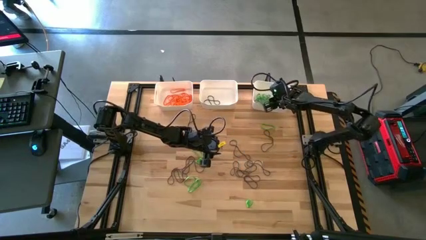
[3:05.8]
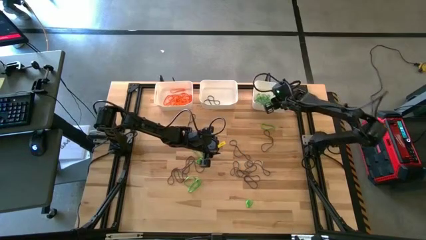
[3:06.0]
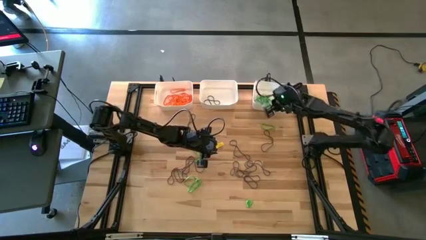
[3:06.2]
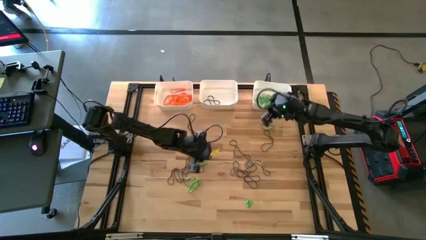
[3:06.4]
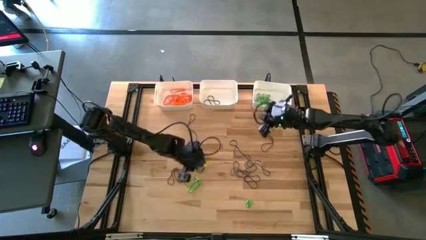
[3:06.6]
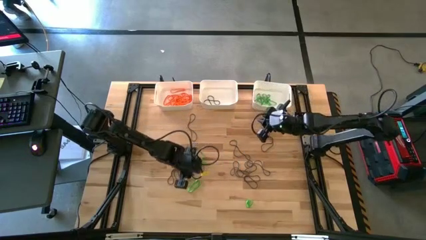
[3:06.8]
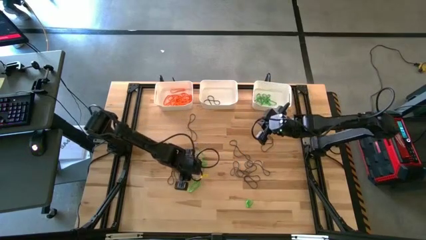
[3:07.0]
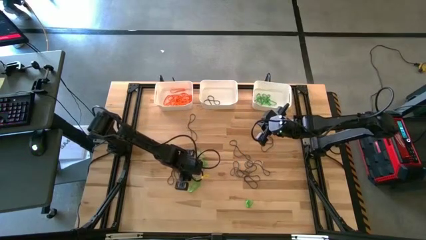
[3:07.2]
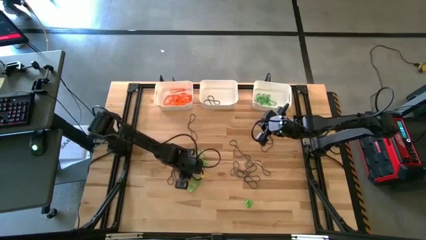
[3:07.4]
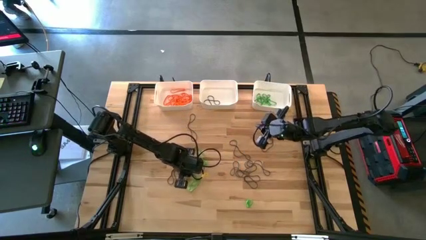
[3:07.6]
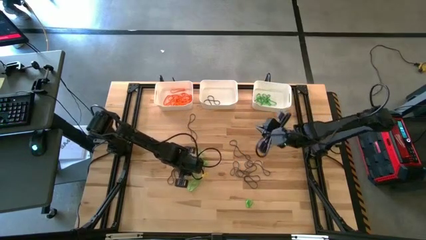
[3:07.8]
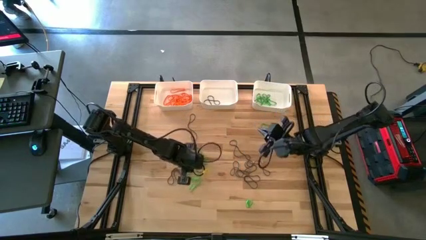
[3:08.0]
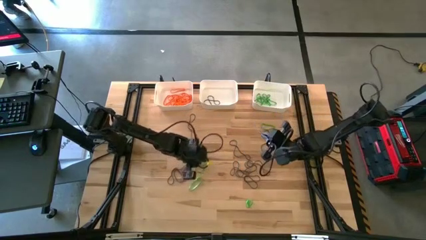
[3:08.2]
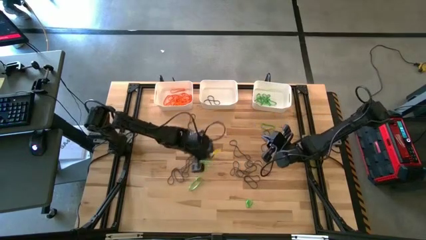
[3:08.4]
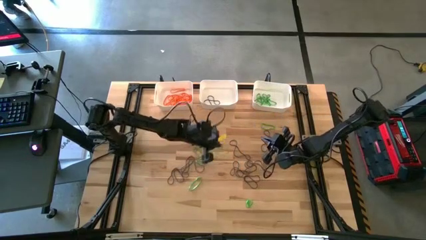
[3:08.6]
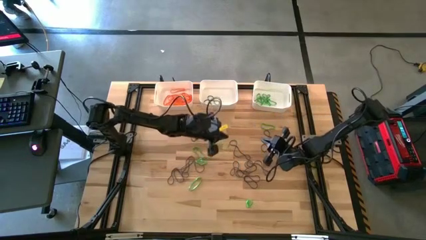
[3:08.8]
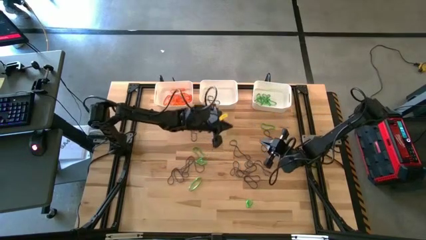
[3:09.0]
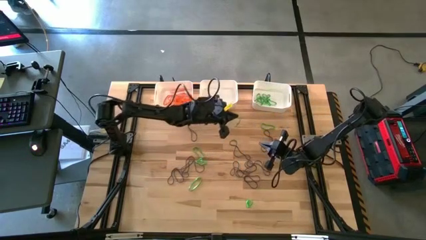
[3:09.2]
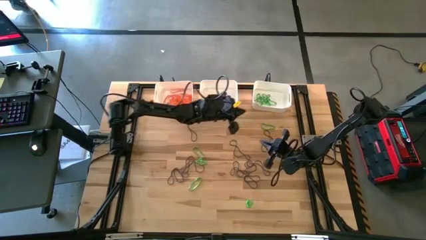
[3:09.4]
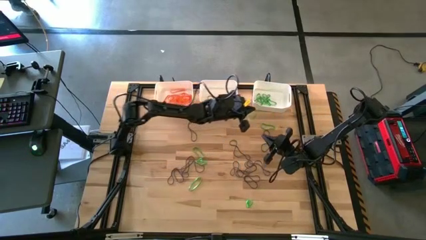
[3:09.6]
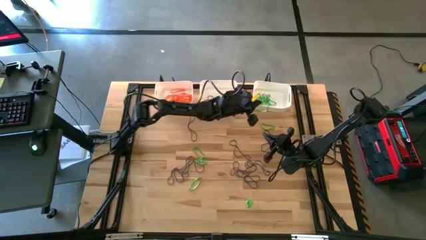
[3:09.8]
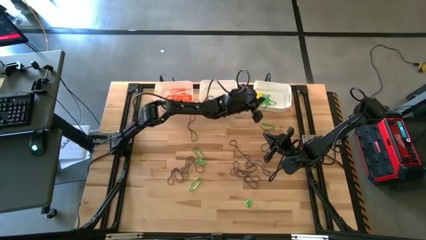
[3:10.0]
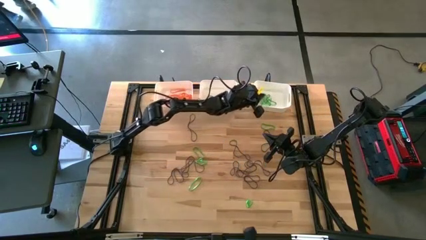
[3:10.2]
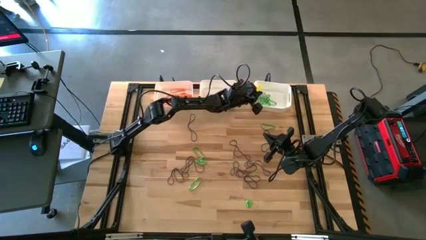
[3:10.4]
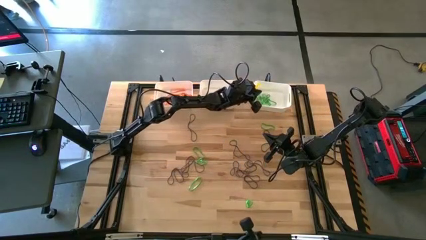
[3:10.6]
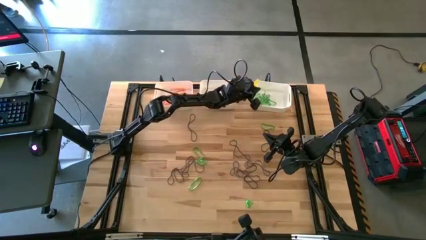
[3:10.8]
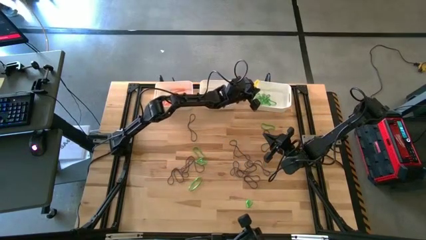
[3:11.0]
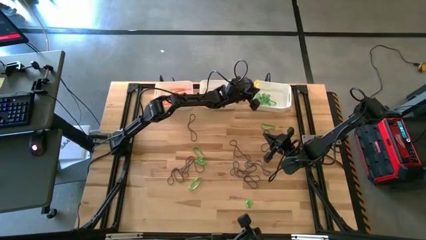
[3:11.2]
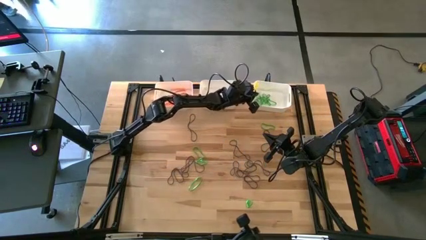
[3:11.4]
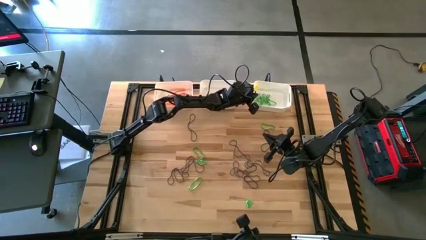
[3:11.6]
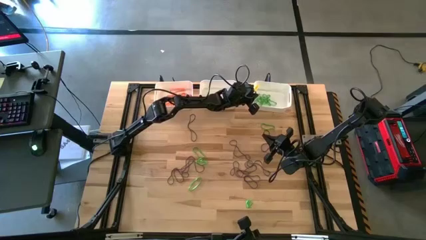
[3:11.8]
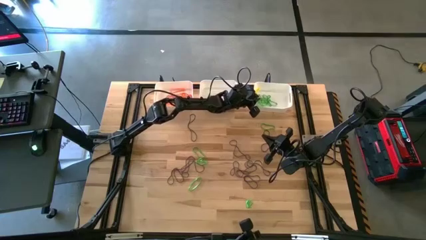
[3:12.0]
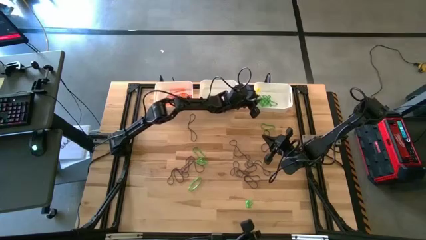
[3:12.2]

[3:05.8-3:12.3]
Task: Sort rubber bands into baskets
Put the green rubber band into the right white bin

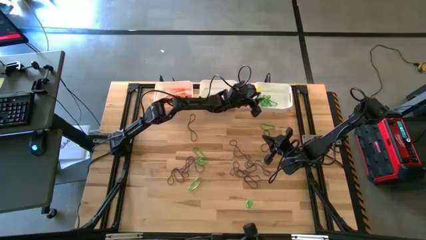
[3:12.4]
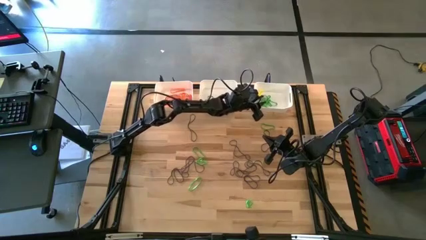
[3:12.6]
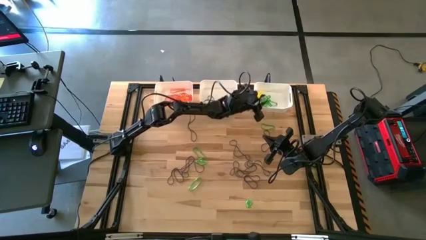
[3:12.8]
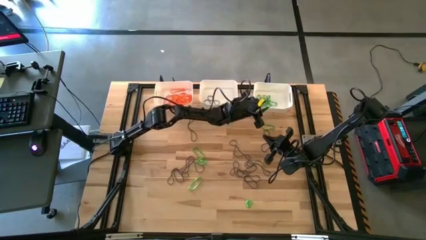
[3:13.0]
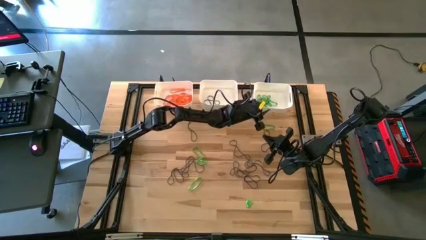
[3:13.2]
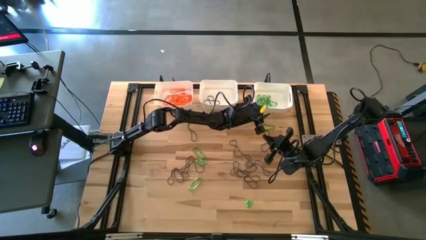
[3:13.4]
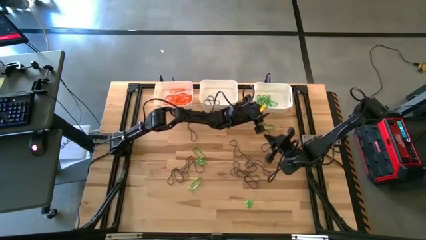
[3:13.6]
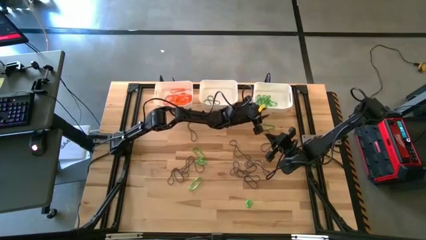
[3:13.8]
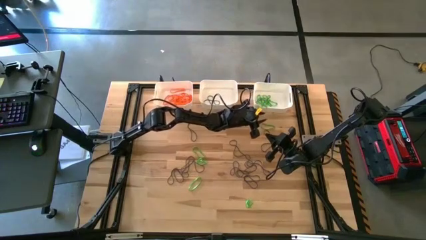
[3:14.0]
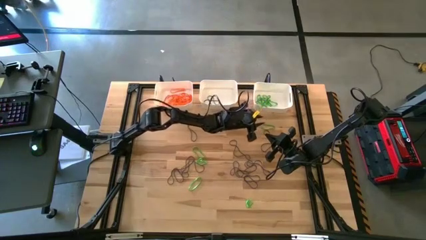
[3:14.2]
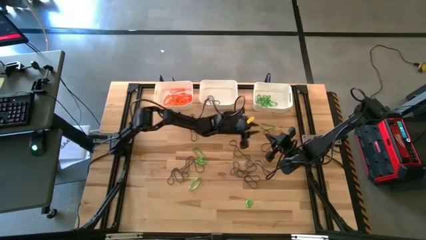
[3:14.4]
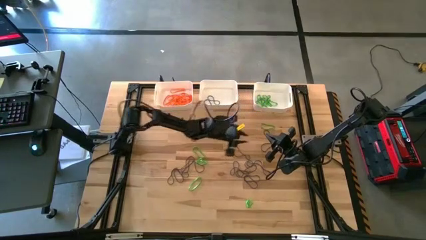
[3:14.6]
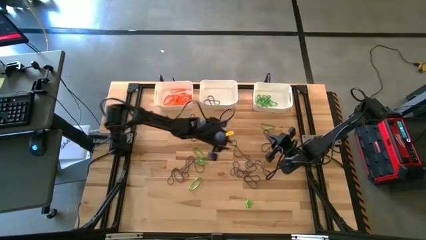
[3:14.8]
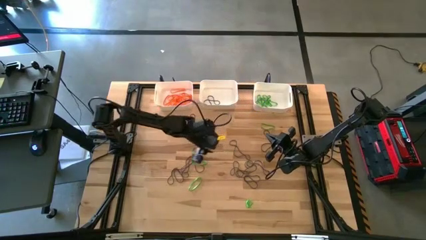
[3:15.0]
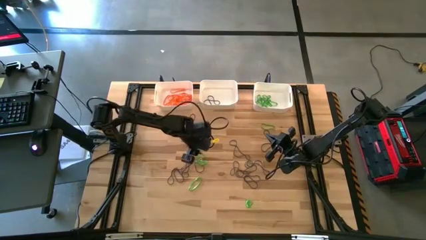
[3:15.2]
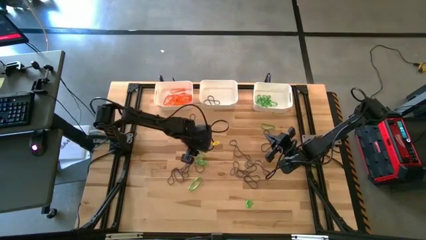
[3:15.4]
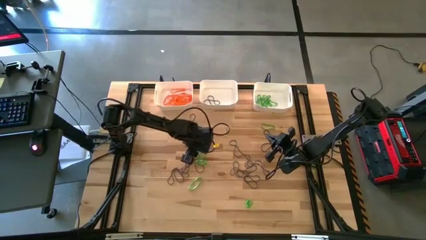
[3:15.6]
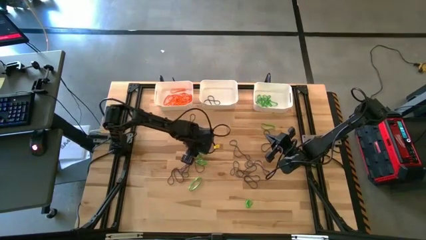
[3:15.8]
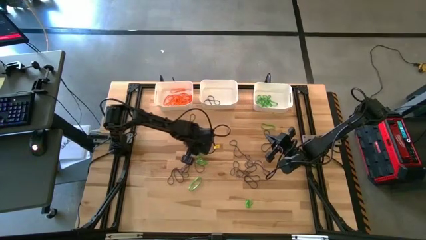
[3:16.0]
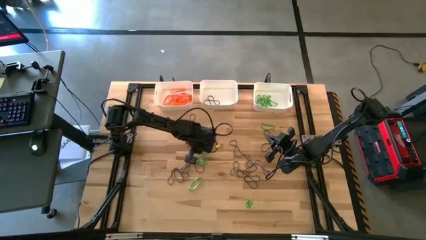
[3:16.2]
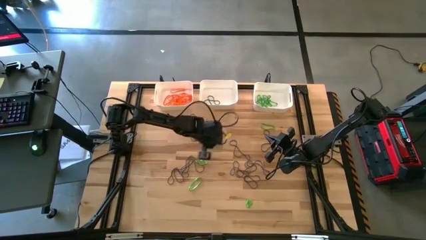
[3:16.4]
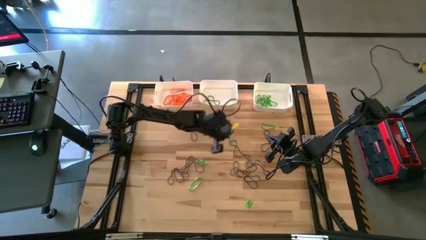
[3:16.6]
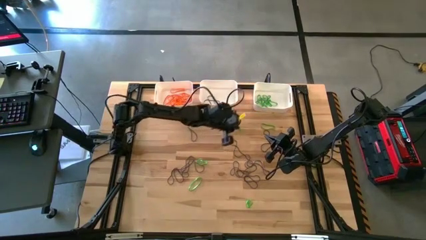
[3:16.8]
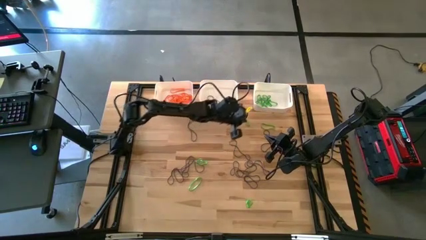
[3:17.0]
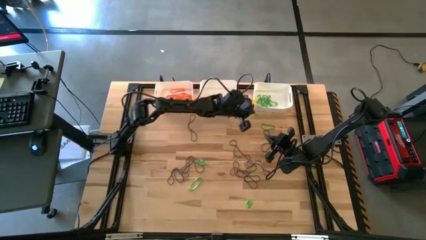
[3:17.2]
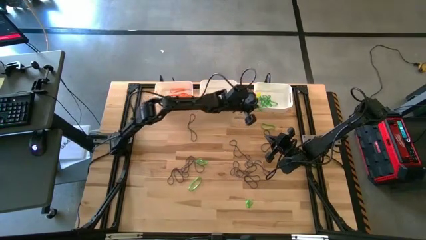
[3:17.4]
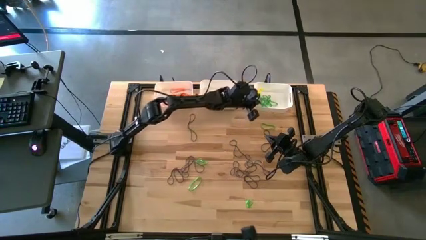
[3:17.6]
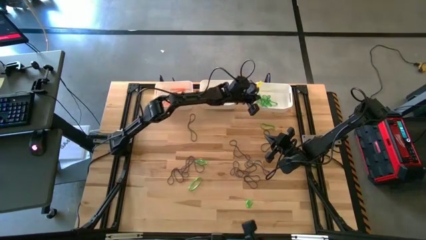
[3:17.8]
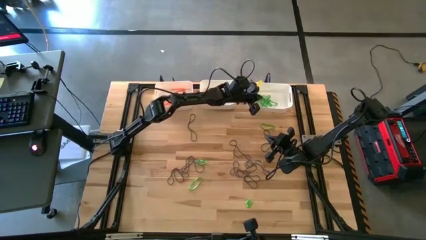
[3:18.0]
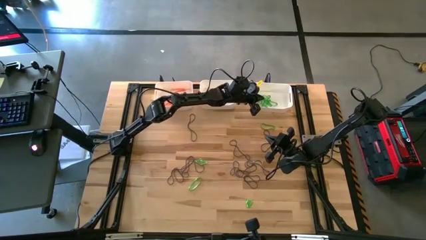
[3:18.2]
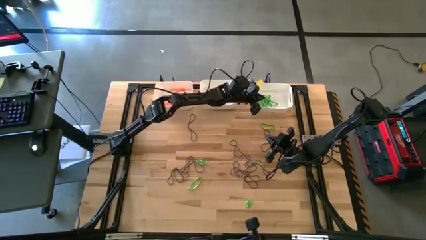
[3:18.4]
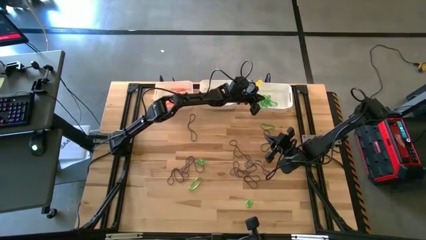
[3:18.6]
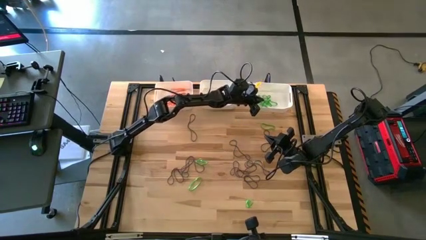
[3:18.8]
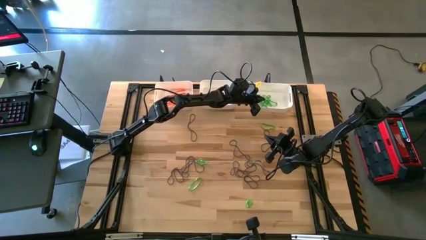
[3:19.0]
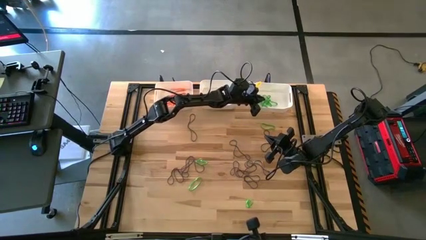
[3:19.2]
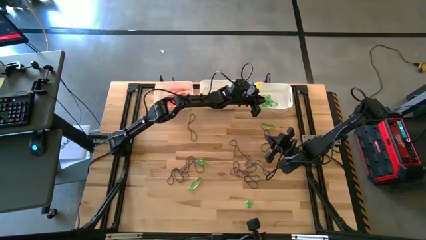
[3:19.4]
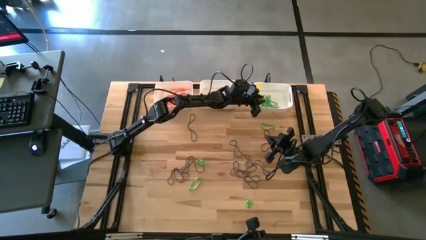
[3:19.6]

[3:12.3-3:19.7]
Put the green rubber band into the right white bin

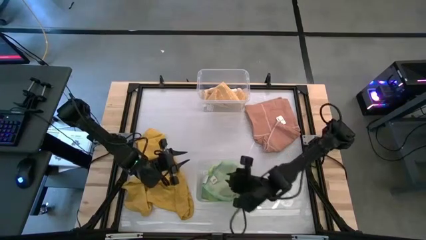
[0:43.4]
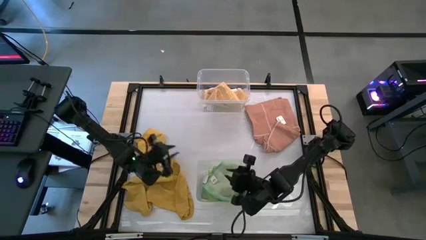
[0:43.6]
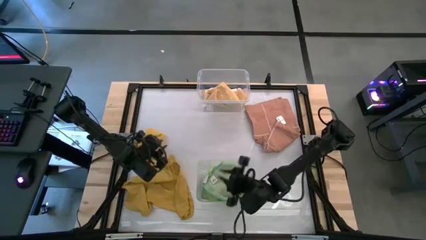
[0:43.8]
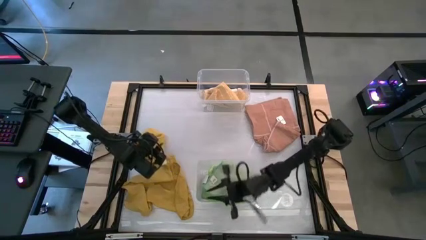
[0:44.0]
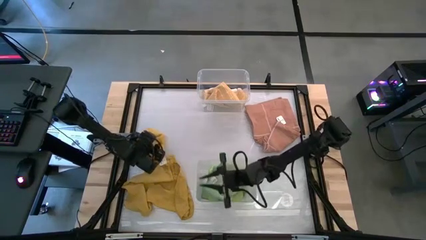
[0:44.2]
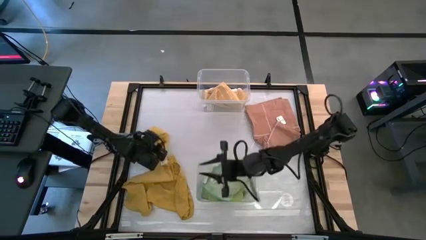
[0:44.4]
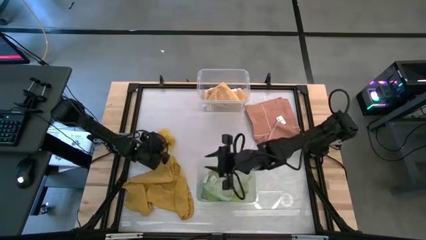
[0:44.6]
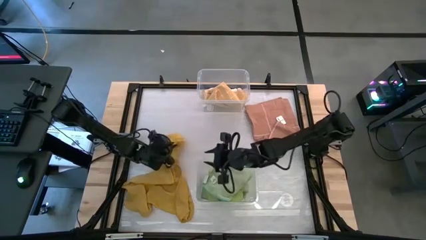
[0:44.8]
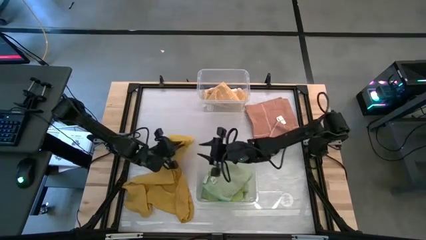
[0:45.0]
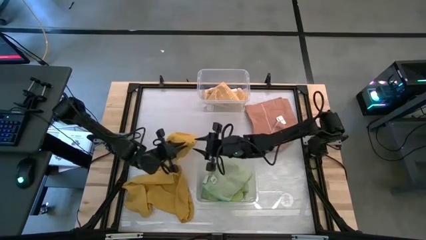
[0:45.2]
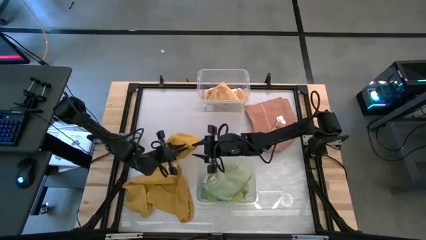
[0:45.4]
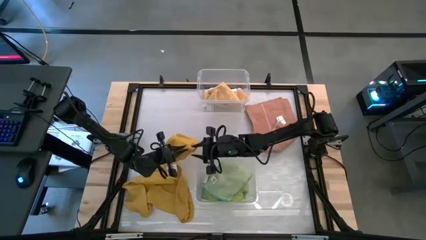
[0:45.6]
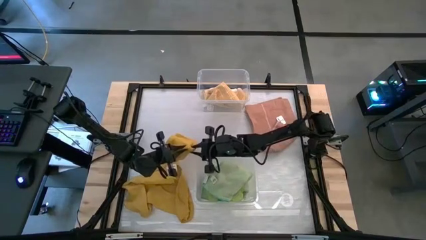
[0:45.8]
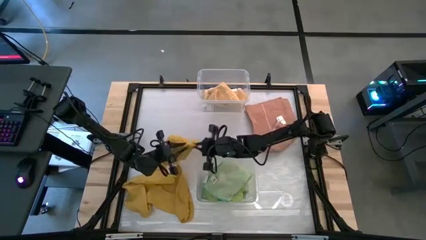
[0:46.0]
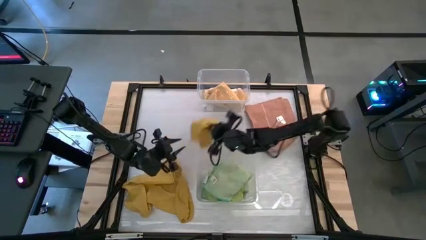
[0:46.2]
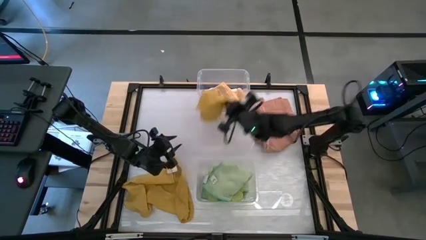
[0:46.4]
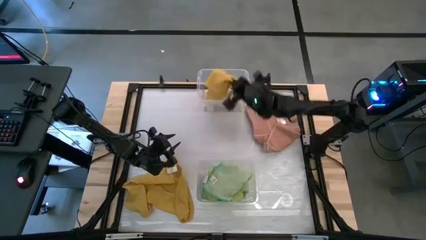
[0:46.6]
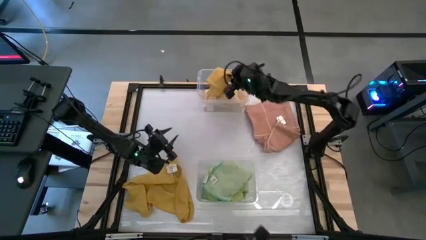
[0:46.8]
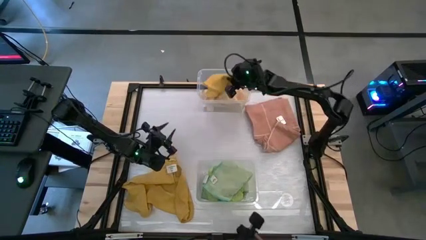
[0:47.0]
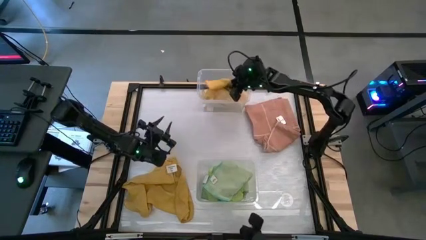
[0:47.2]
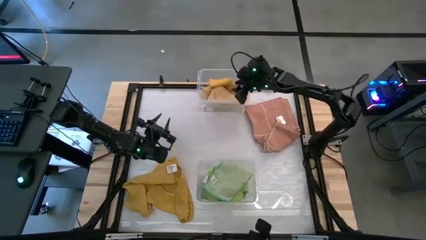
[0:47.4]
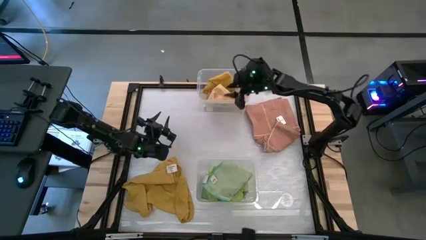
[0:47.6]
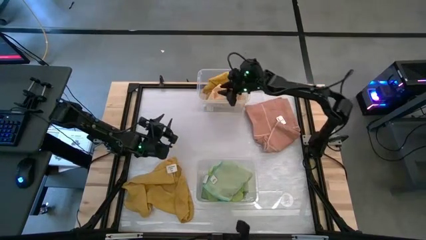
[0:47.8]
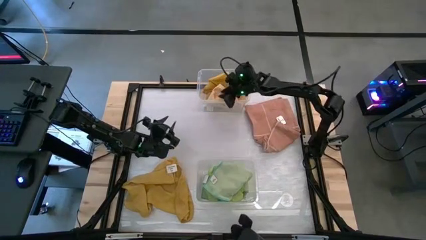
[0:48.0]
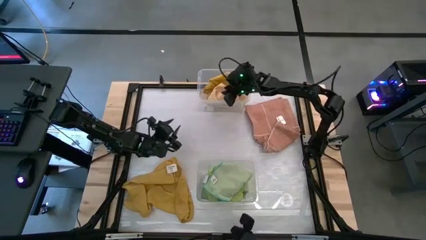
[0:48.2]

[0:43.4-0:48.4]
Task: Sort towels by color in basket
Put the top yellow towel into the top transparent bin
